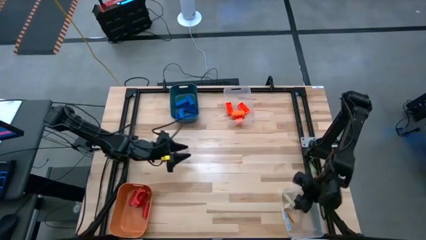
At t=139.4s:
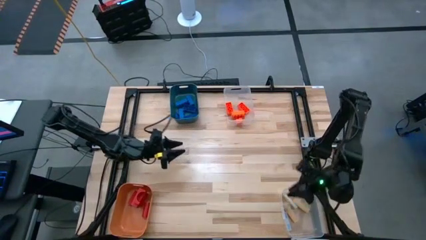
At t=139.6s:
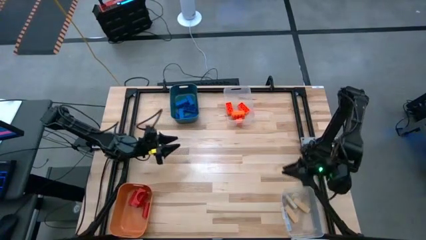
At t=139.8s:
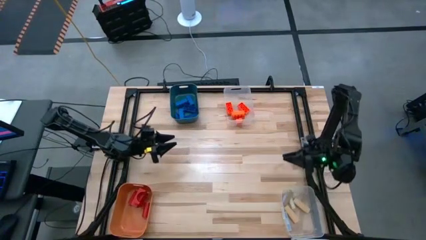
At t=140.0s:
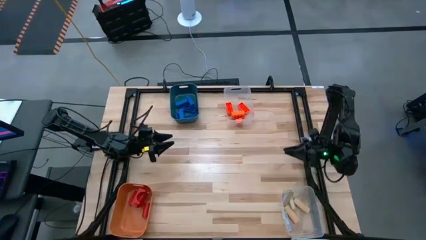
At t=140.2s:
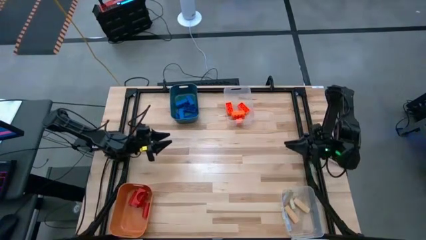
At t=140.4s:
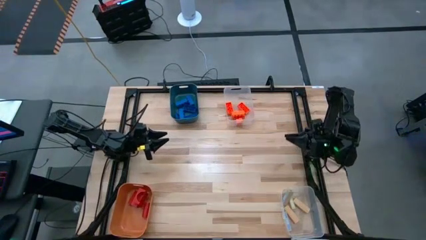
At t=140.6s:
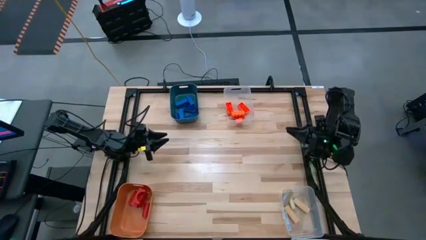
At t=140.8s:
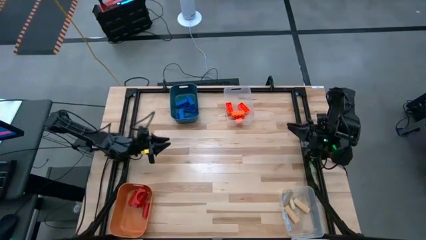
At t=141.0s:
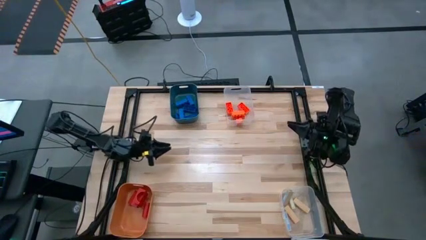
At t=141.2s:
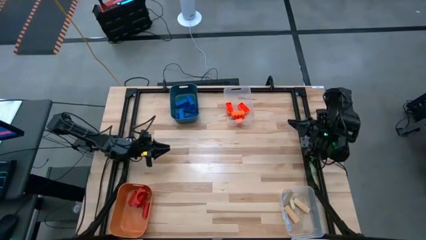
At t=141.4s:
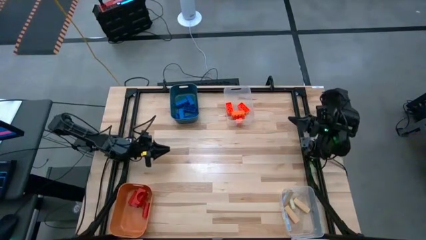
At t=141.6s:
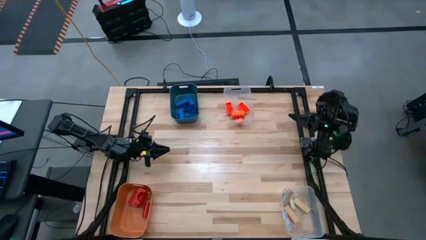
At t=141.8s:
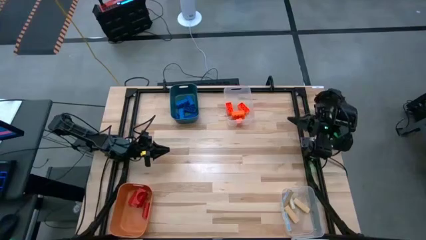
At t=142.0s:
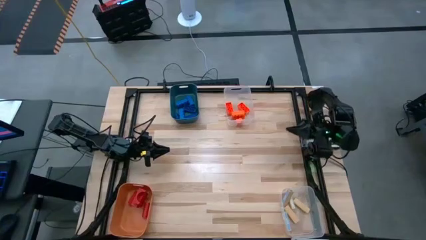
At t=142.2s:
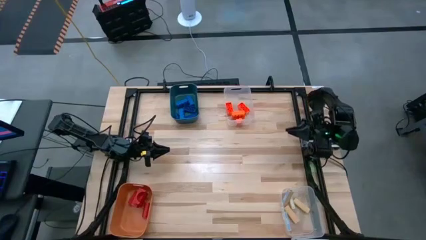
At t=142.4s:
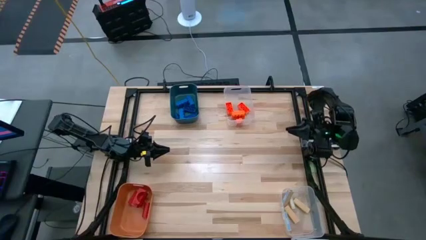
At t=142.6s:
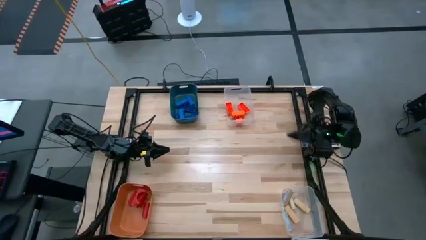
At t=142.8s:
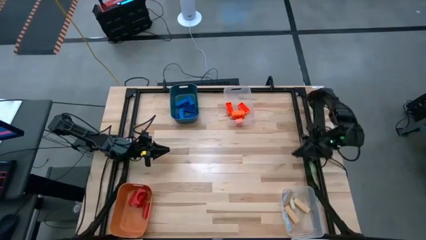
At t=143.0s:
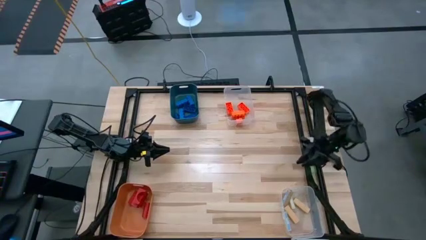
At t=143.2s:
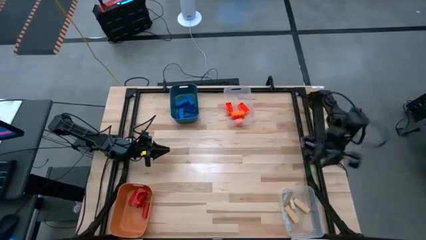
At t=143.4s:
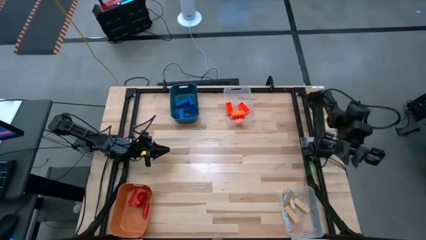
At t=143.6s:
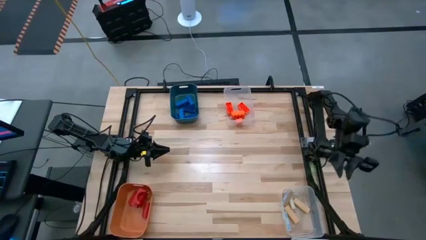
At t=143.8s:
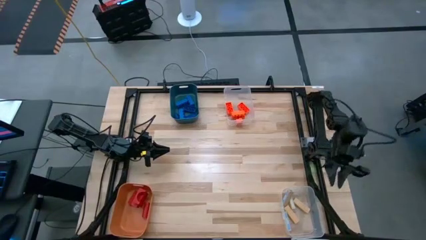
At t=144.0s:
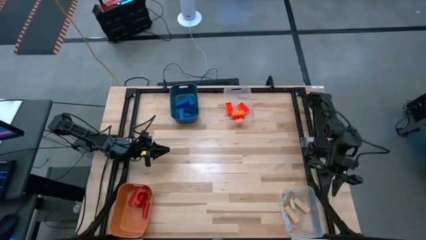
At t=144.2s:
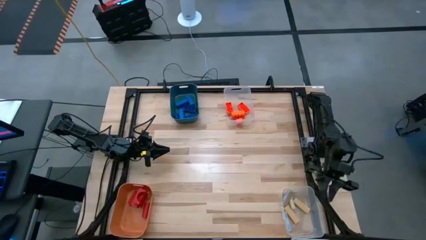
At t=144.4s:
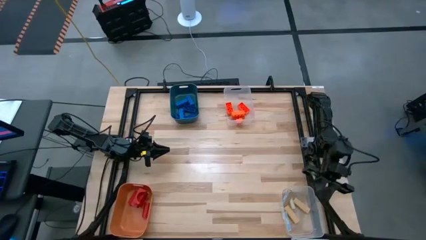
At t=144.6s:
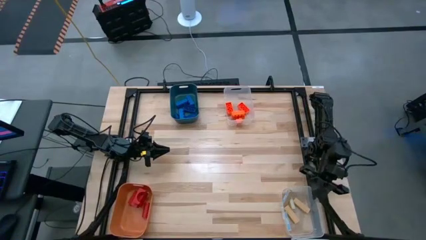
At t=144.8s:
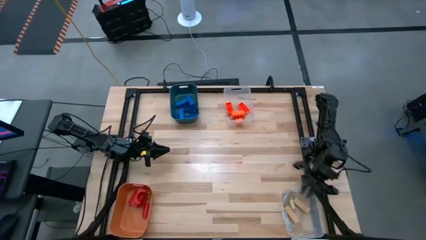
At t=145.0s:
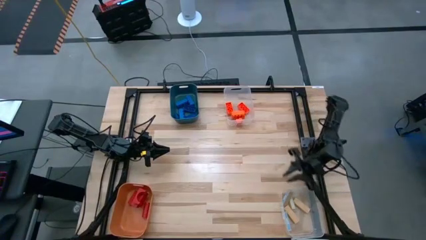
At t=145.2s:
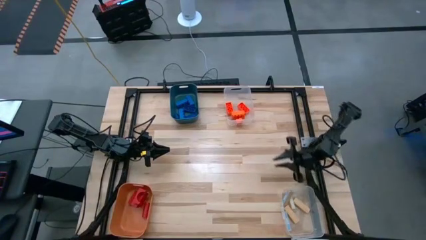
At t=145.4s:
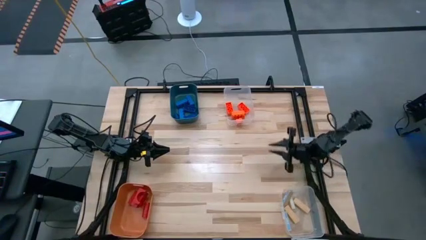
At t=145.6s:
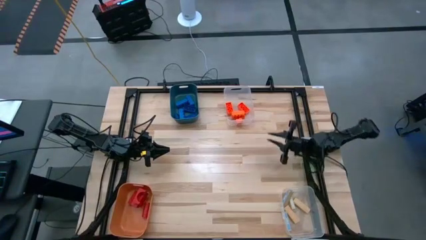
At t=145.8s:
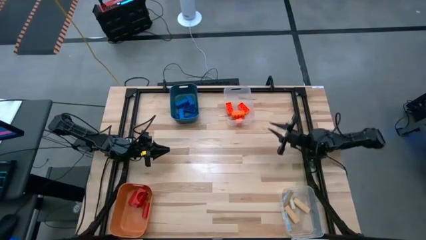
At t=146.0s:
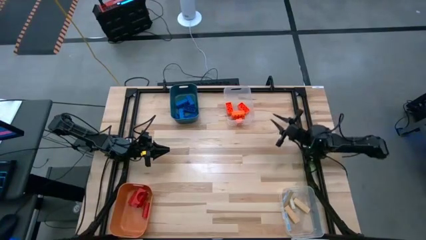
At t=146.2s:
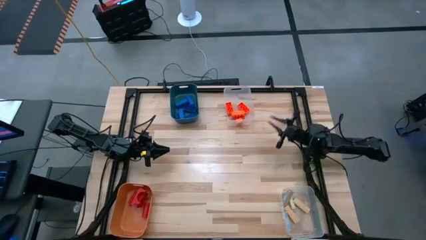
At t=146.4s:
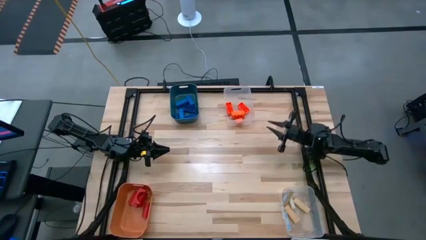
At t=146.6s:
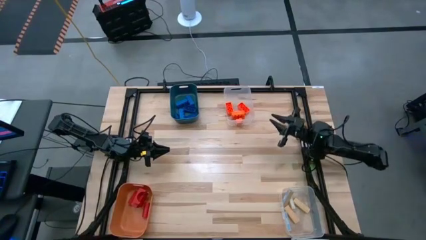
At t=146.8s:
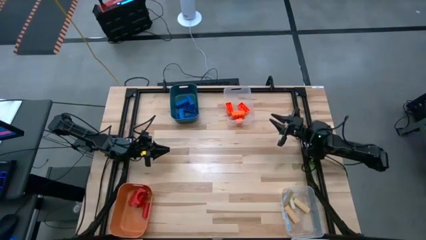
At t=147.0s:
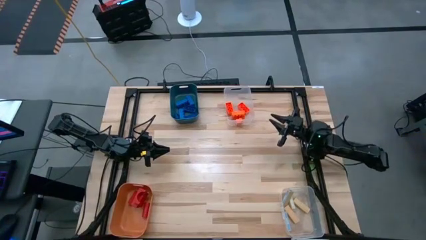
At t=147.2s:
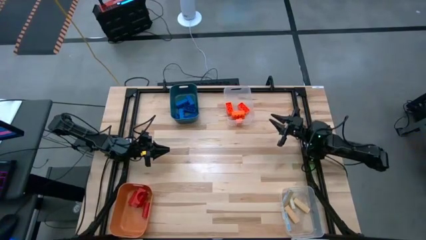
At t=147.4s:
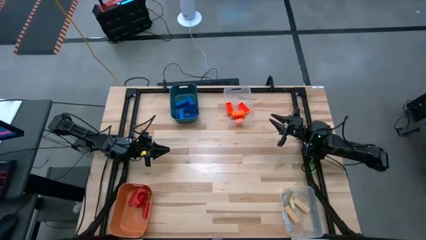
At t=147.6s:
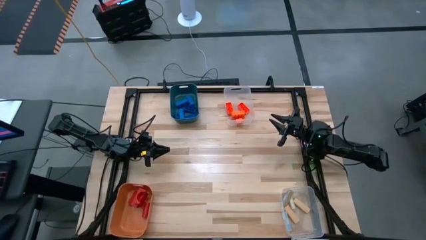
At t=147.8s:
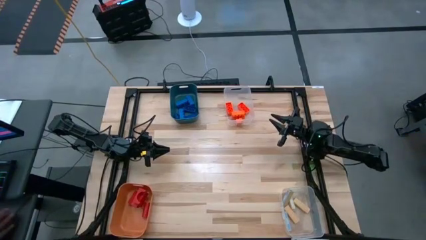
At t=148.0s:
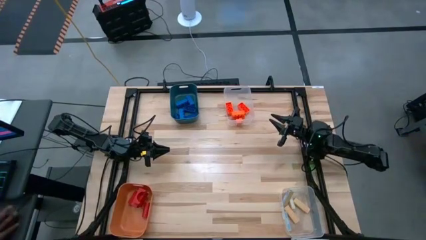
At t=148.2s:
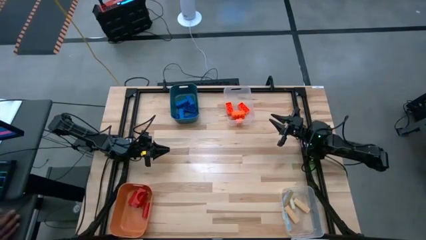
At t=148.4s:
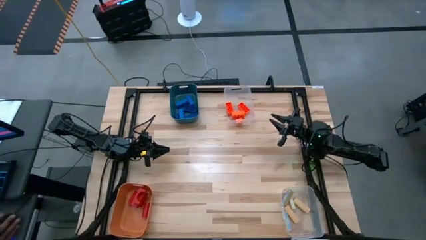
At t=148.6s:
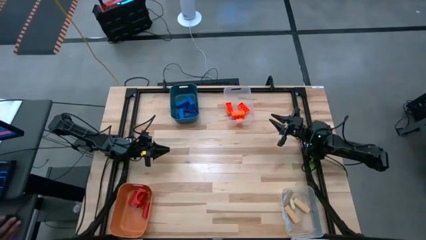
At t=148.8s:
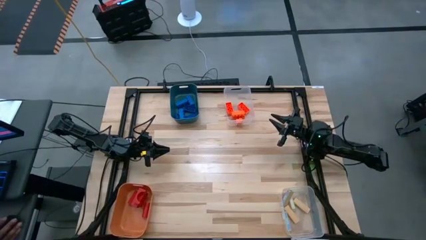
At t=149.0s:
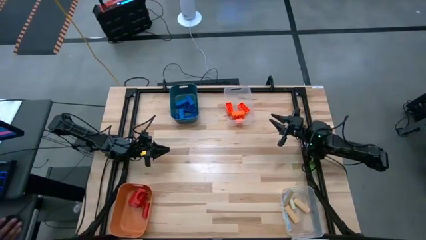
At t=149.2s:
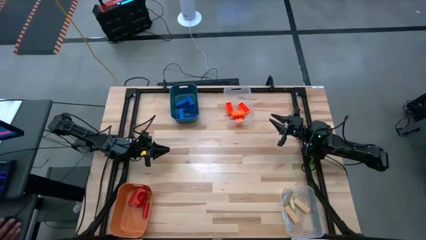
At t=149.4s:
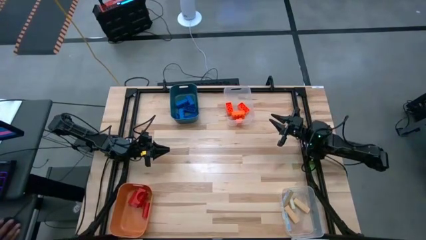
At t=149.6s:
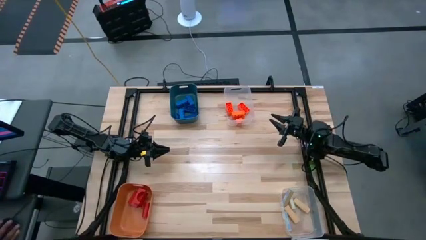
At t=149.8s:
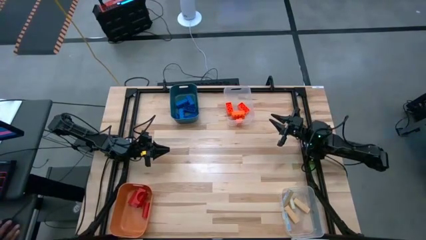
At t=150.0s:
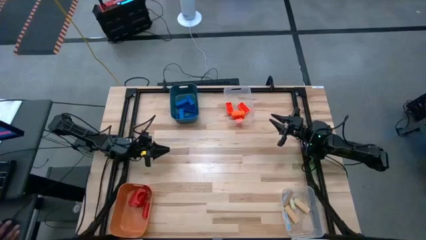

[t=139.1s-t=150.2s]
Task: Sort blocks
Return to Home Position

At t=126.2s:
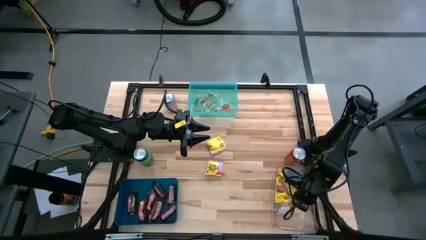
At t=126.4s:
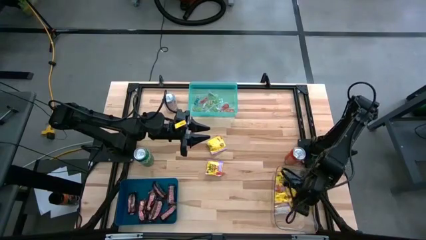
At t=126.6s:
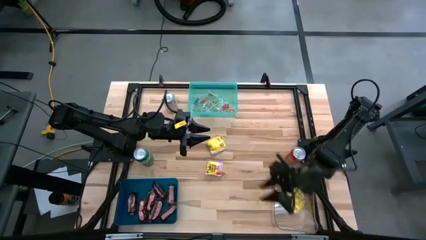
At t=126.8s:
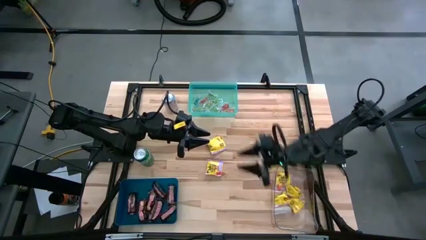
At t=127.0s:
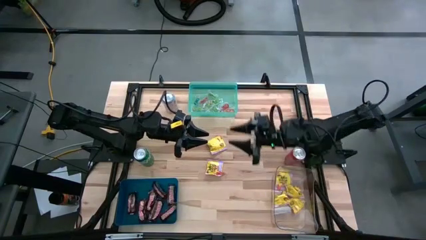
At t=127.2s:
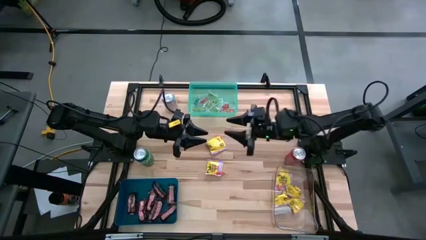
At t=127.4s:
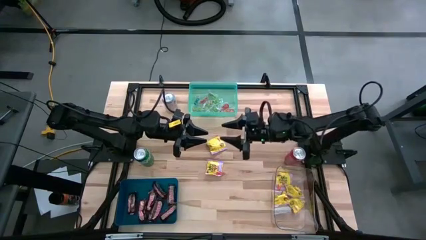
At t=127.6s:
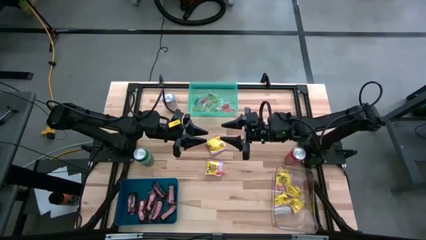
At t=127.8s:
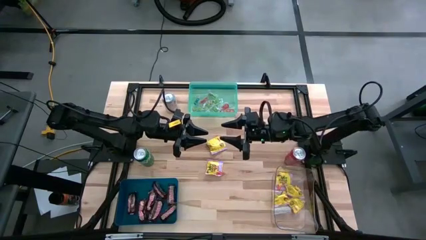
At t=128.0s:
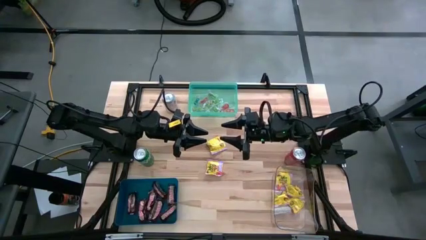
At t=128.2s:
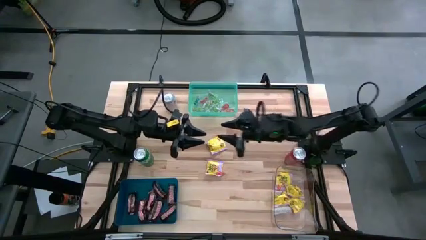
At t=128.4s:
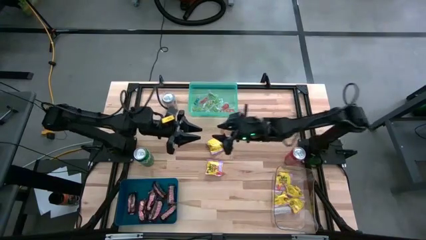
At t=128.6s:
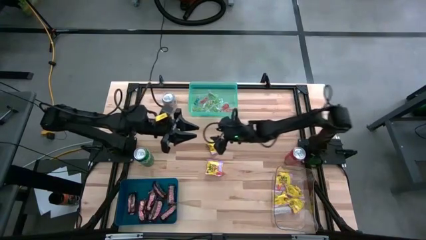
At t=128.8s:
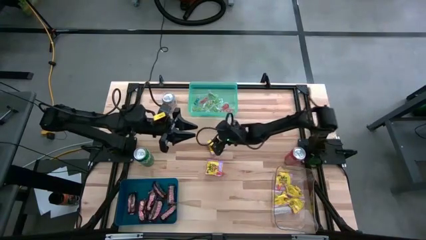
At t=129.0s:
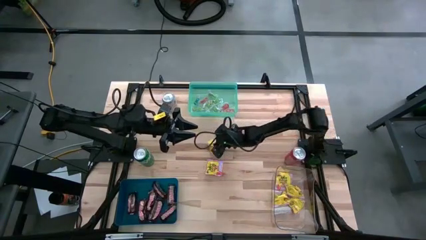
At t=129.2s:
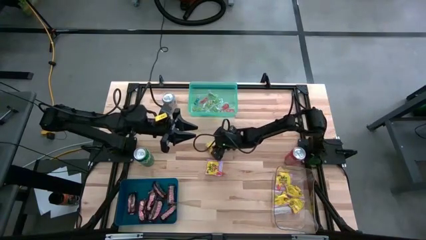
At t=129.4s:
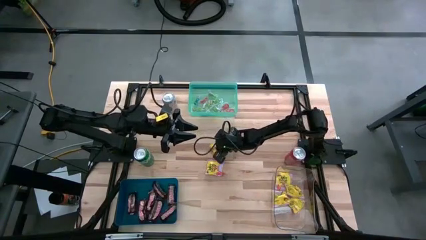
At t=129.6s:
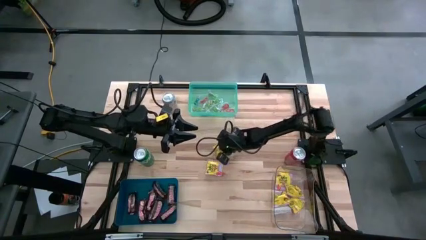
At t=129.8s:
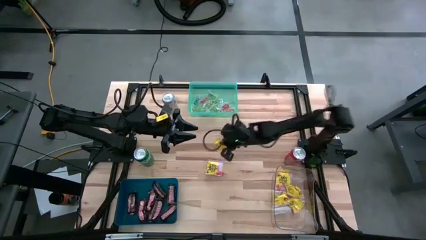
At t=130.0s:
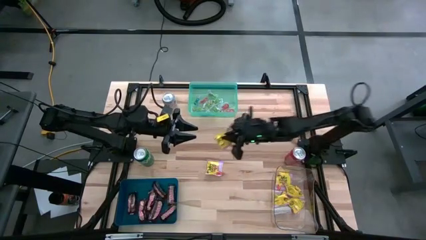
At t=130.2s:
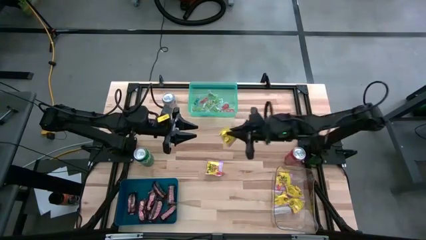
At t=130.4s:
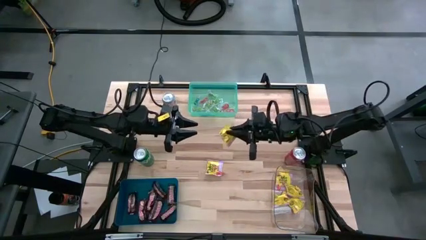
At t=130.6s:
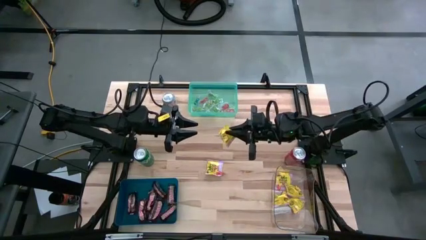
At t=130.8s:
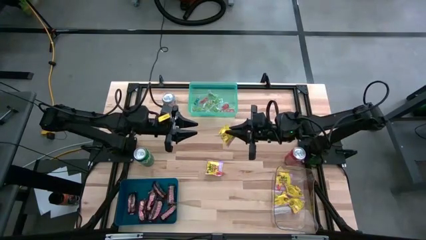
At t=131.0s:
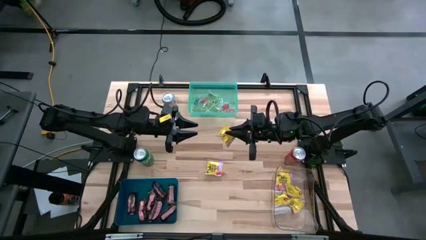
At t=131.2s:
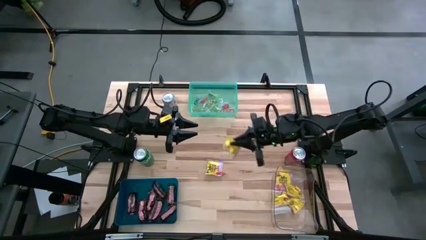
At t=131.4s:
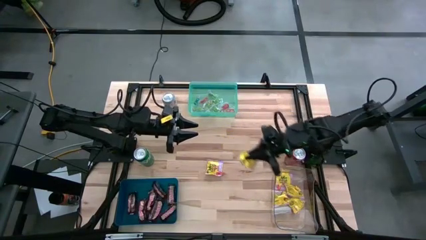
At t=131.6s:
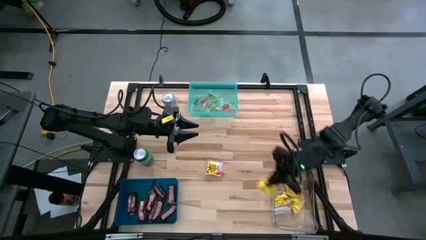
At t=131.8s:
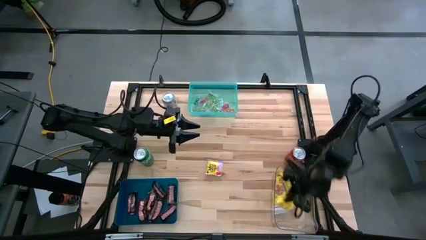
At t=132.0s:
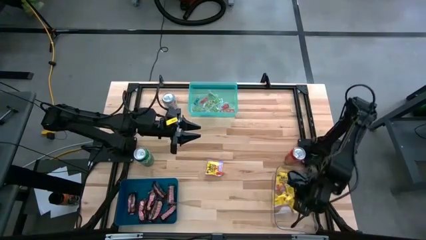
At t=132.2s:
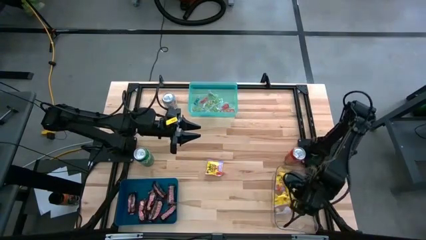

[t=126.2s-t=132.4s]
Task: Sort candy
Put the yellow candy into the transparent bin
